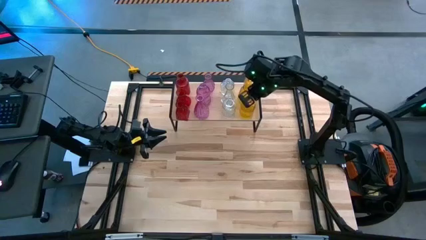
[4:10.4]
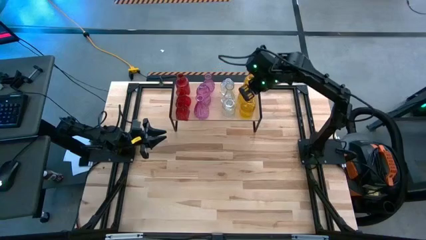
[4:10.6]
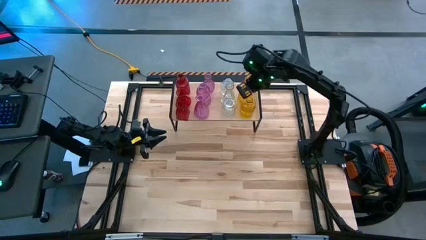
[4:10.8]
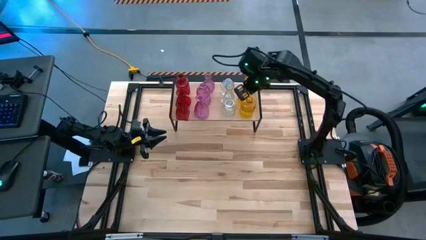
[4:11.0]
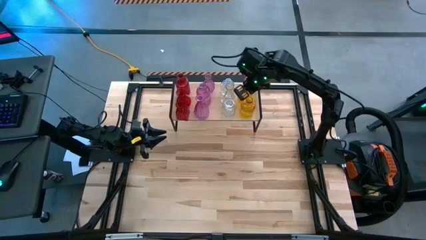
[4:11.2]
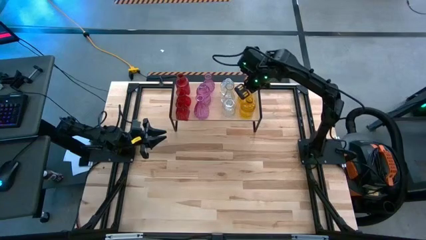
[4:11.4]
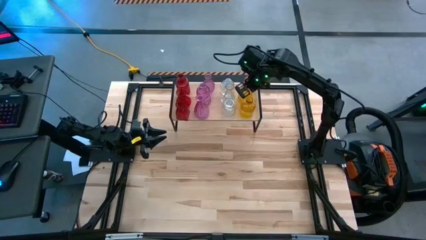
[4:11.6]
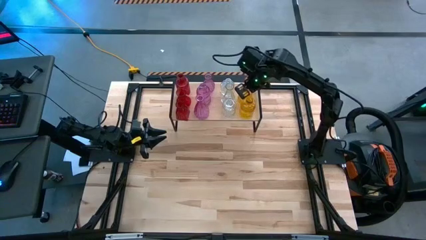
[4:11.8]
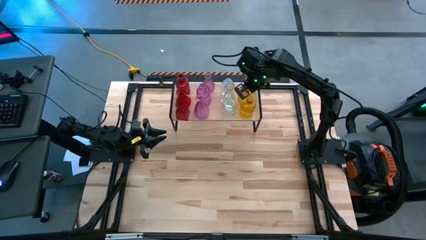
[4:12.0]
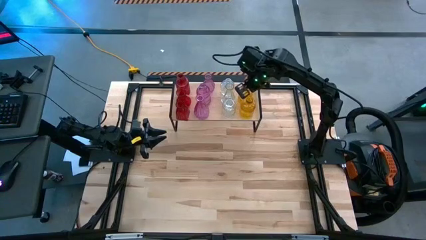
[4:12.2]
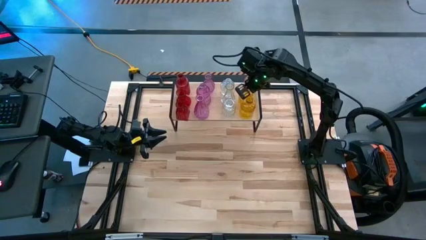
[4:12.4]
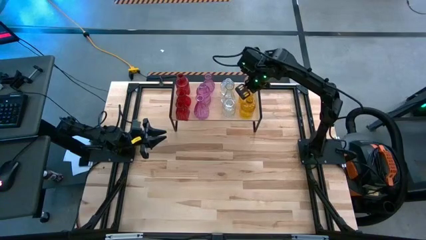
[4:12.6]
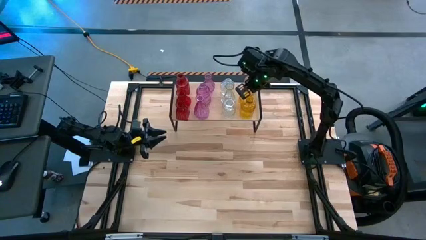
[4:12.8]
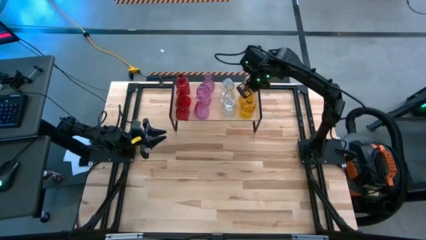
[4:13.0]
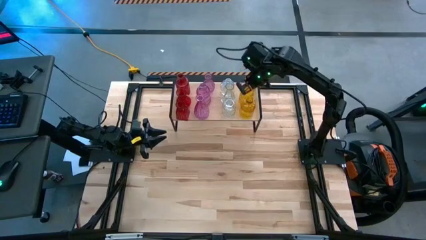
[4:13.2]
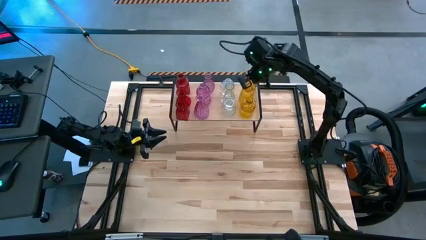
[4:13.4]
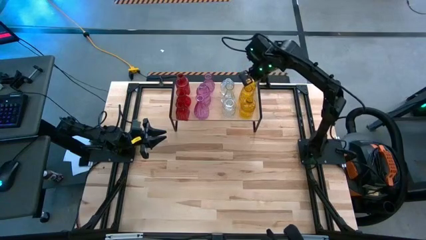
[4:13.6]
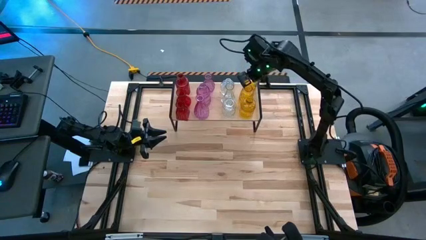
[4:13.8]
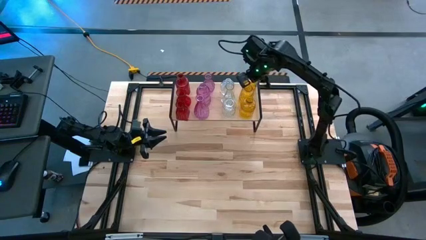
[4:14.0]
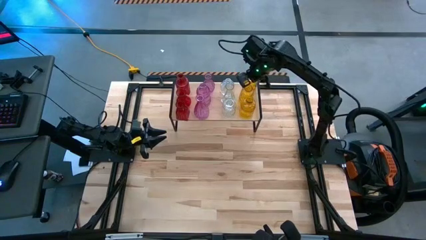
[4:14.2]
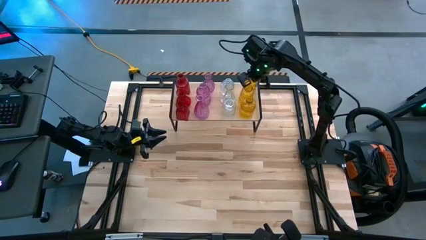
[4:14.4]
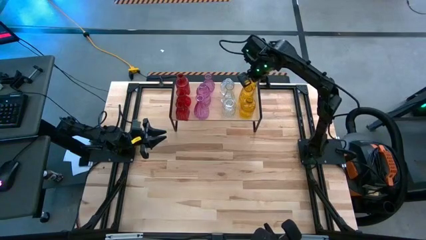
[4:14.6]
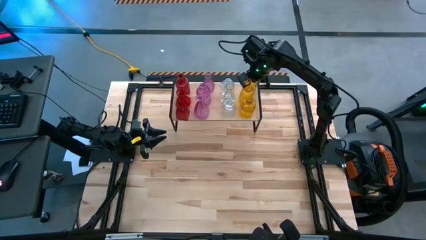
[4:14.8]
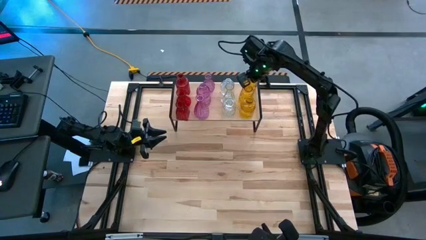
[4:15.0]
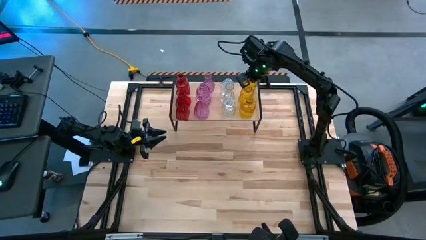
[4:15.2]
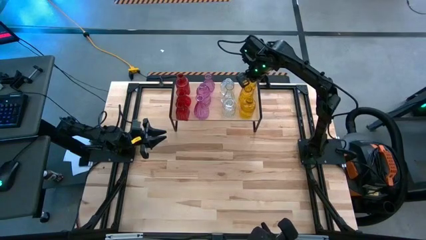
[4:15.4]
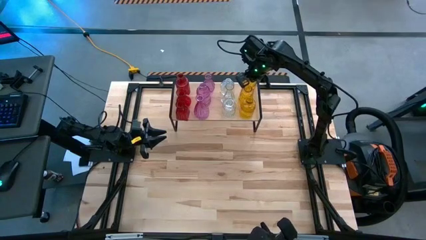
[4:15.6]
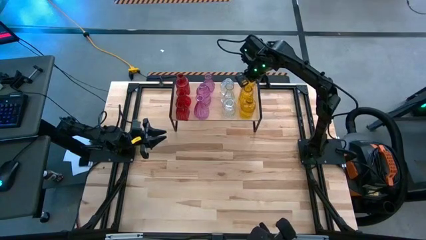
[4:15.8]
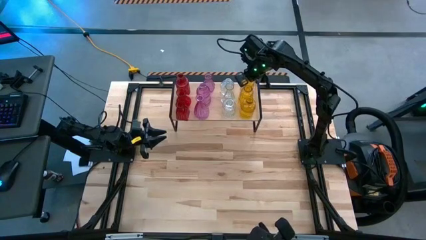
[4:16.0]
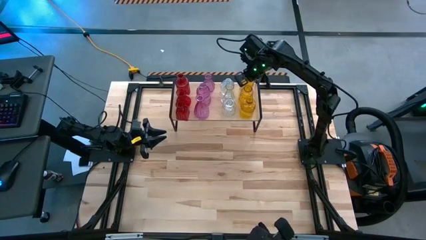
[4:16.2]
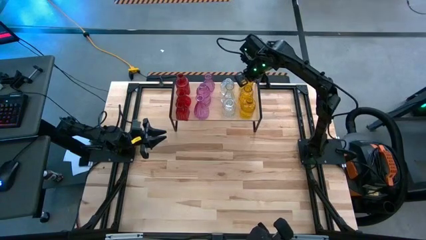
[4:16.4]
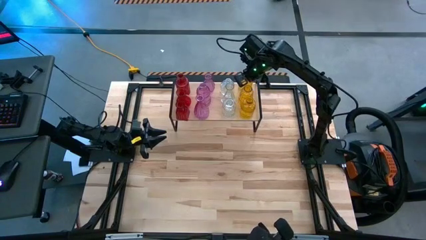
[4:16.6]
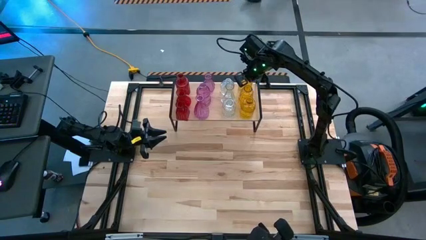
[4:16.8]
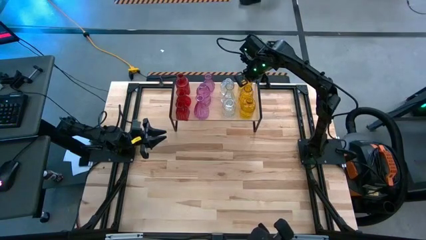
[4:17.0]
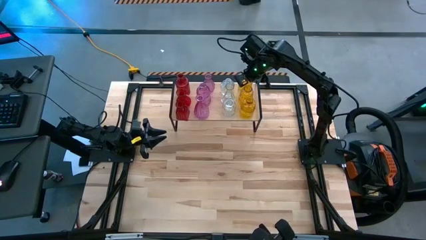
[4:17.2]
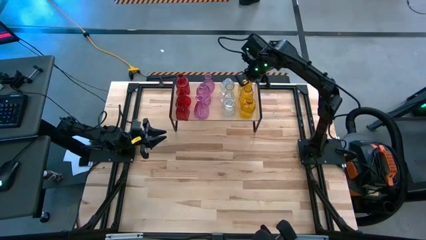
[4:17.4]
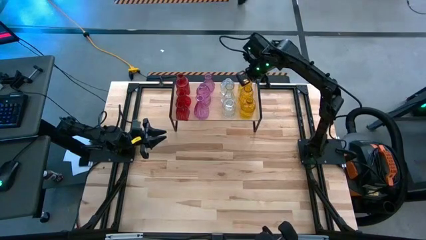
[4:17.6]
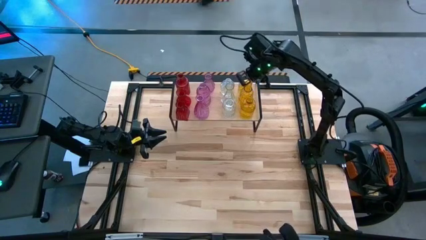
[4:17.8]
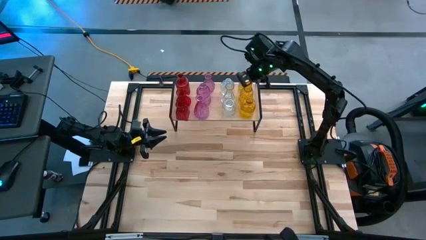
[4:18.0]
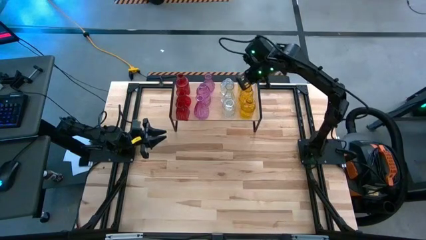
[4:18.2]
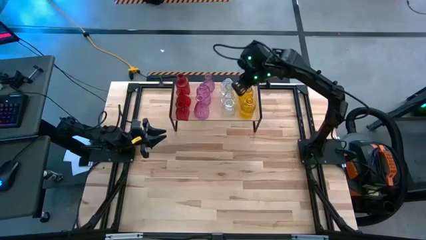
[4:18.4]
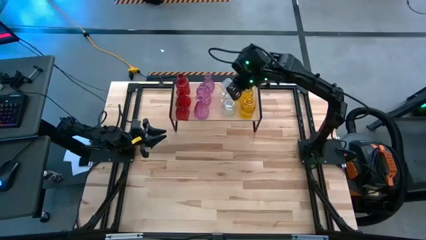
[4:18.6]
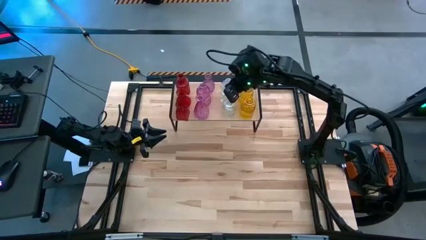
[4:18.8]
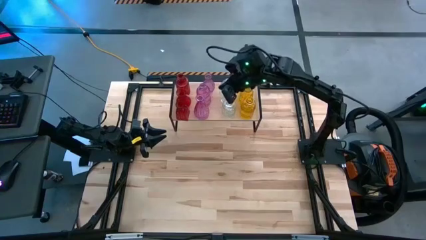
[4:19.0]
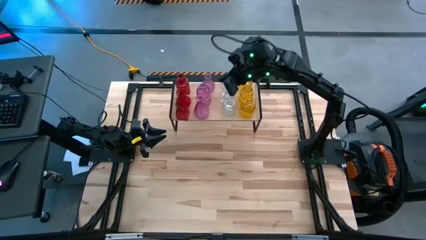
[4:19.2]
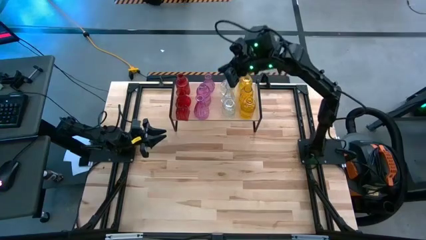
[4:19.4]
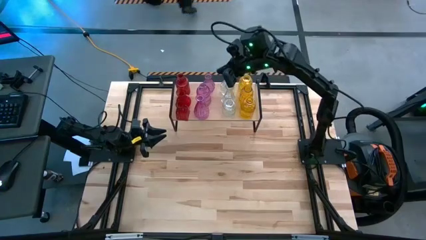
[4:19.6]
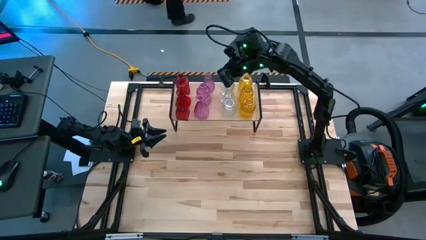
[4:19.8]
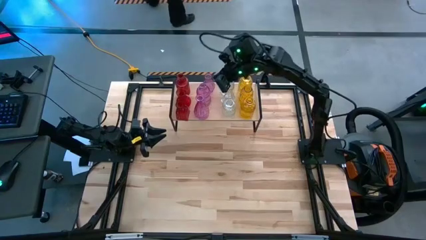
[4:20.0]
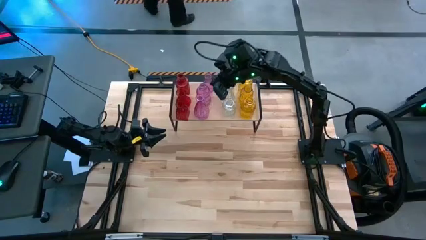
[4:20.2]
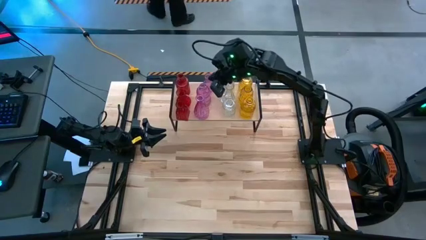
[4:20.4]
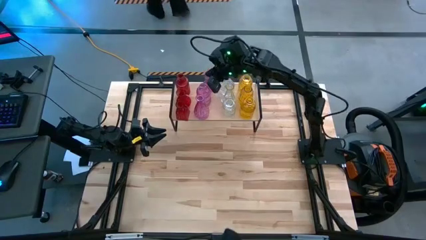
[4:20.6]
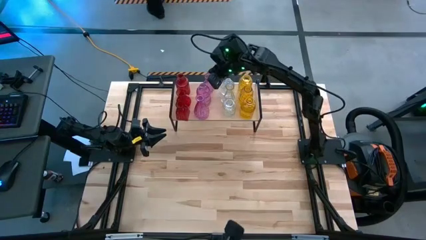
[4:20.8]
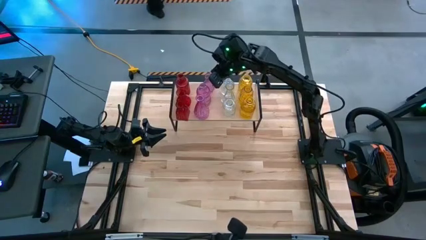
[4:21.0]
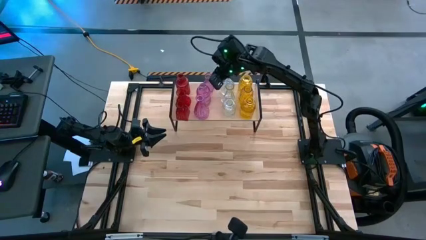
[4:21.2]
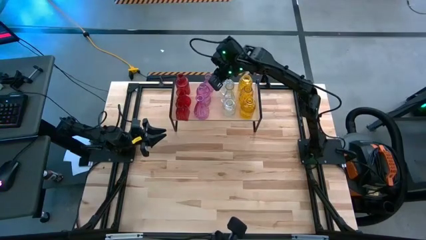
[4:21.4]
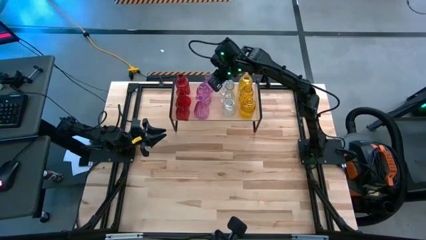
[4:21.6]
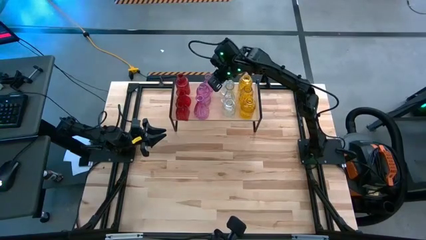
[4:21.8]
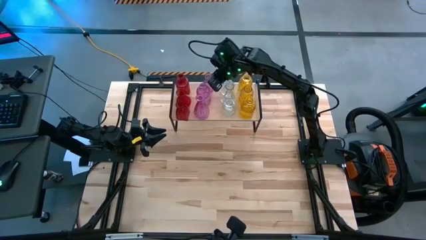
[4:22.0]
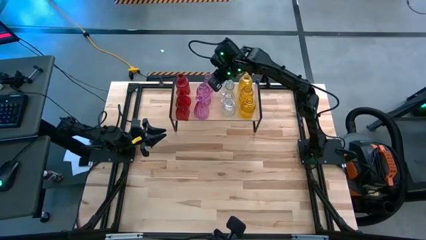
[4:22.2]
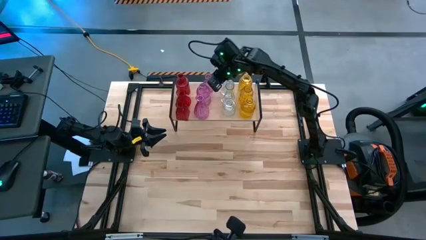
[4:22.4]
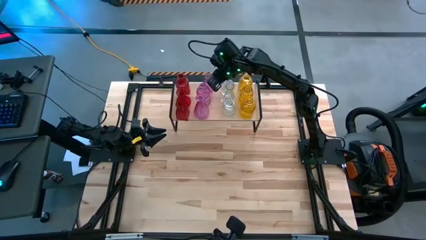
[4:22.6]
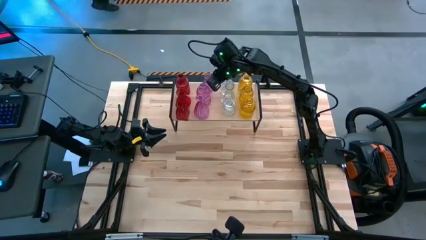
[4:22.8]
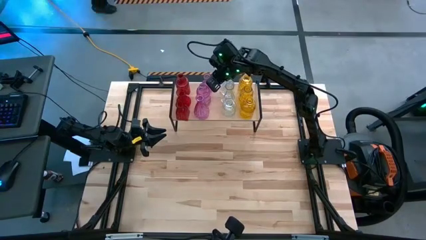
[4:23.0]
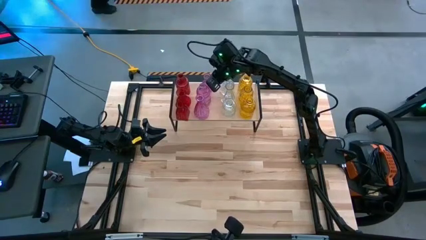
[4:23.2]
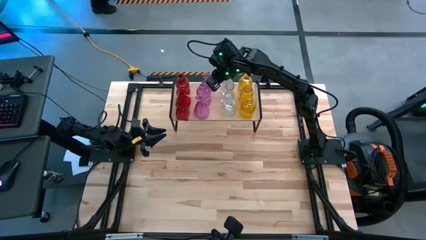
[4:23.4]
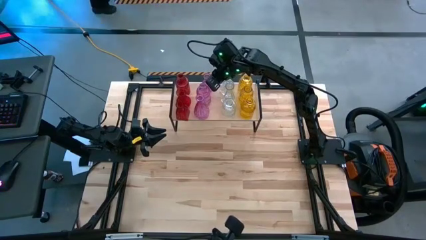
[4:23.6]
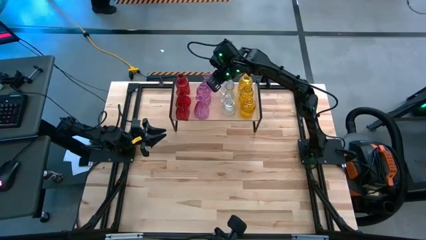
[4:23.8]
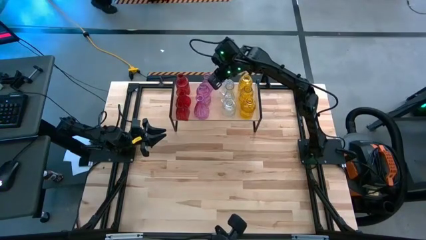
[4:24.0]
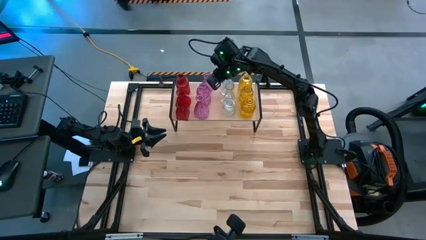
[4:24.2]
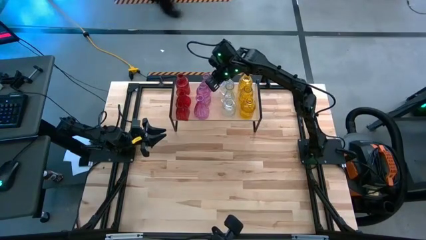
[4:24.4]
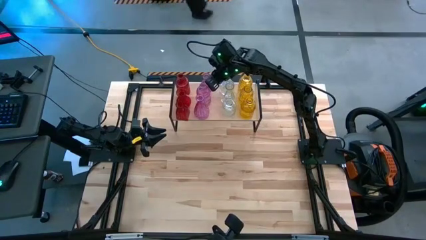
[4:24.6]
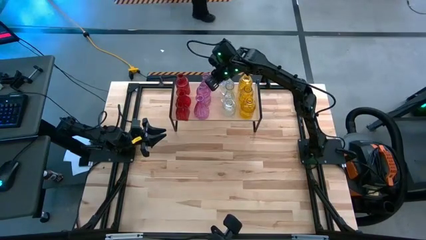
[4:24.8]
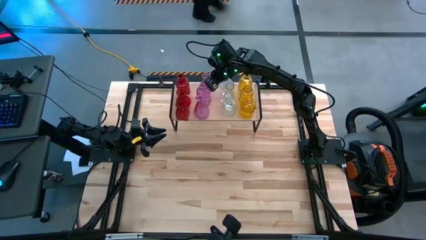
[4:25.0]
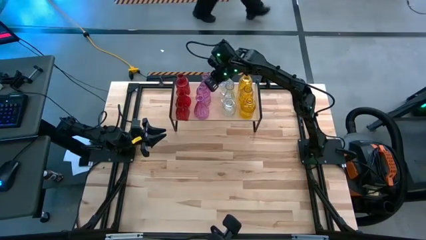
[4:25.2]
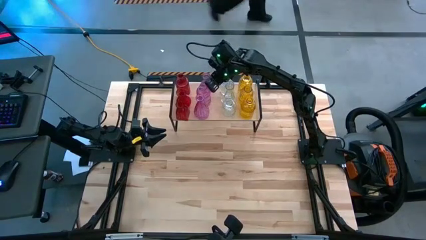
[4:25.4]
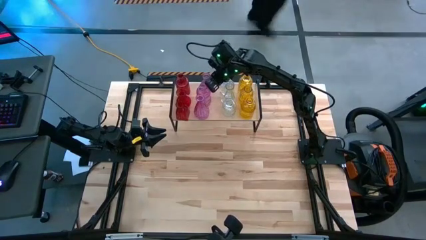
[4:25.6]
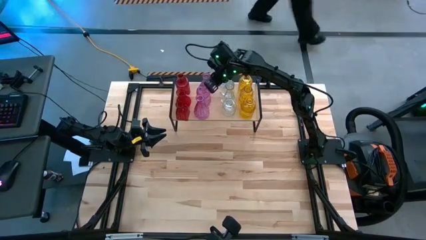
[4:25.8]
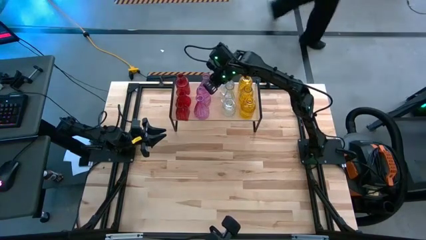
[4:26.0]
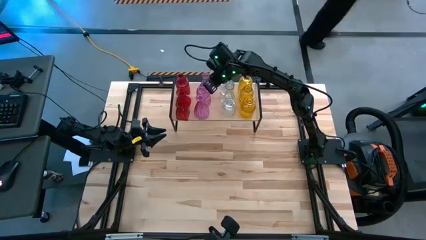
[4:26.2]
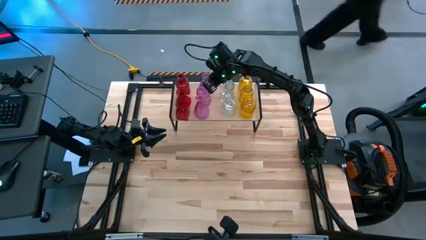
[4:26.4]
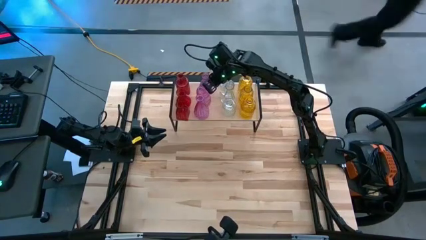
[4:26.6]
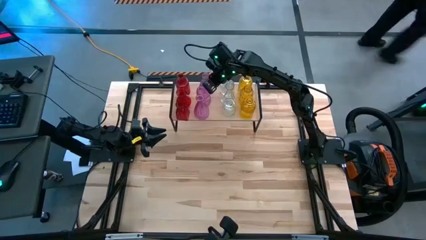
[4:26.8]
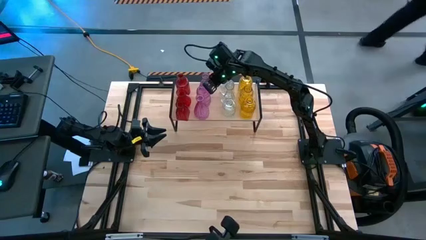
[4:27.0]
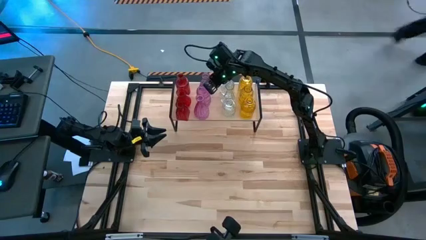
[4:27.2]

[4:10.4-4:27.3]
Task: sort vases onto shelf
Adjust the vases on the shelf
